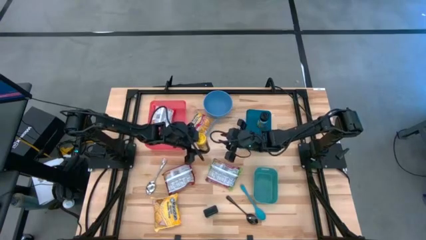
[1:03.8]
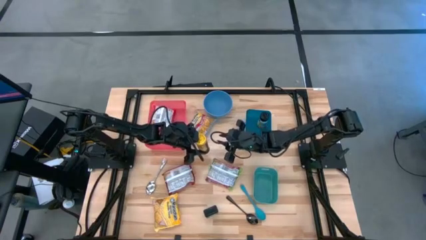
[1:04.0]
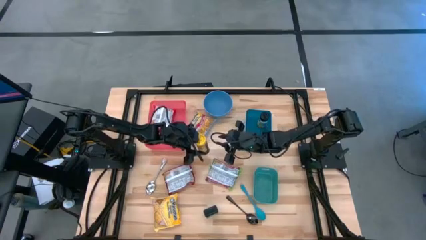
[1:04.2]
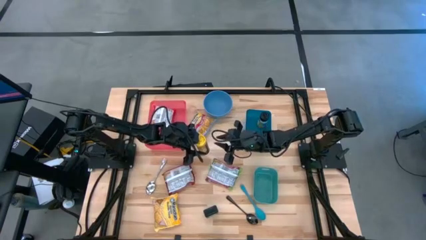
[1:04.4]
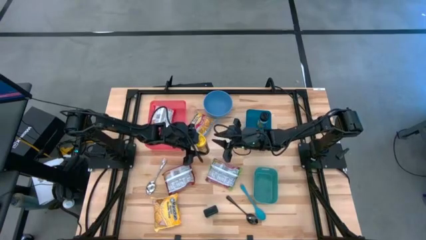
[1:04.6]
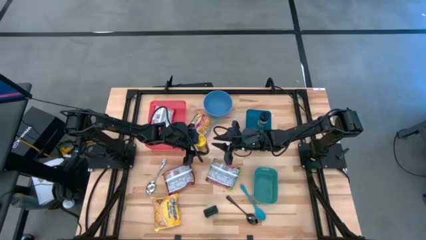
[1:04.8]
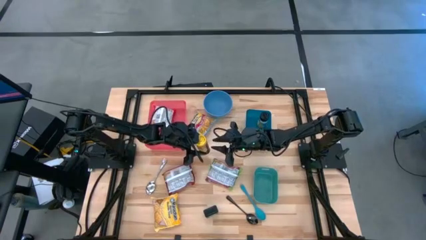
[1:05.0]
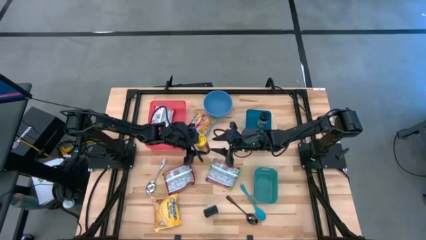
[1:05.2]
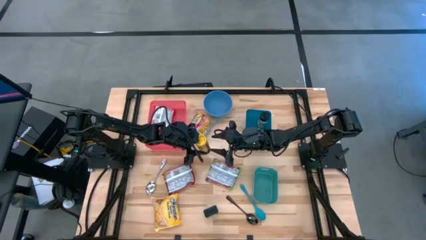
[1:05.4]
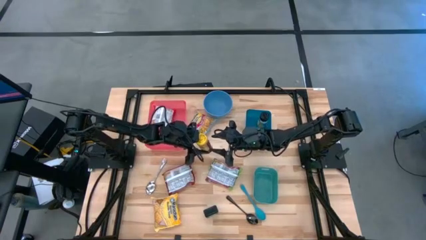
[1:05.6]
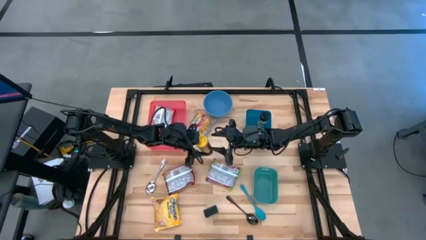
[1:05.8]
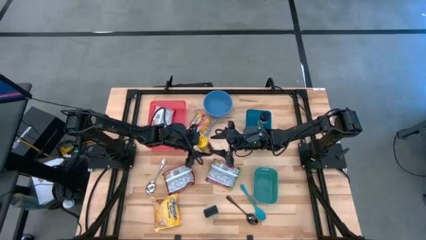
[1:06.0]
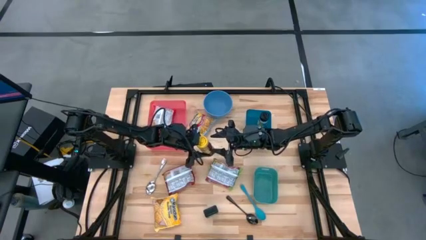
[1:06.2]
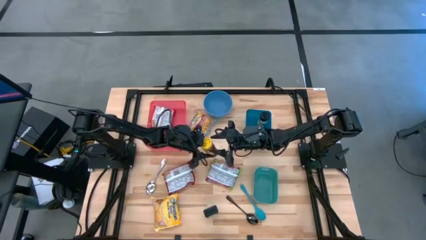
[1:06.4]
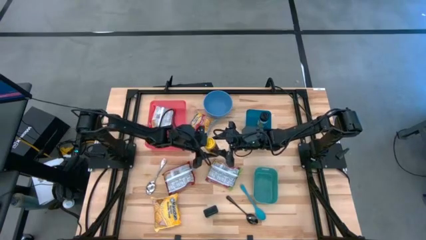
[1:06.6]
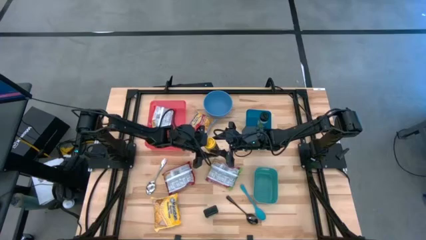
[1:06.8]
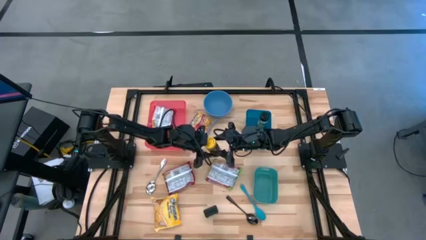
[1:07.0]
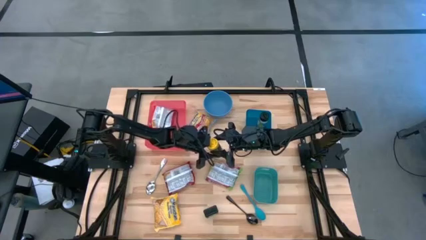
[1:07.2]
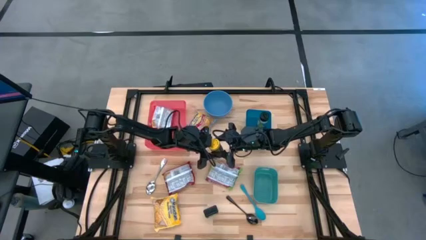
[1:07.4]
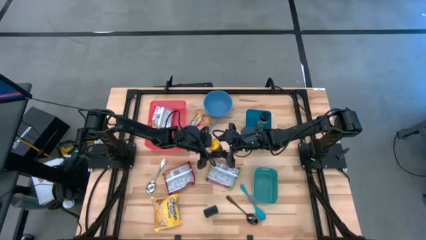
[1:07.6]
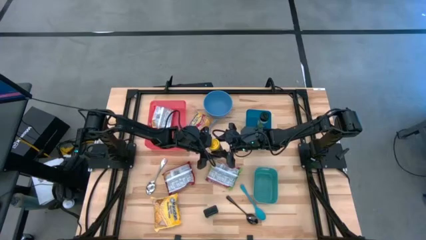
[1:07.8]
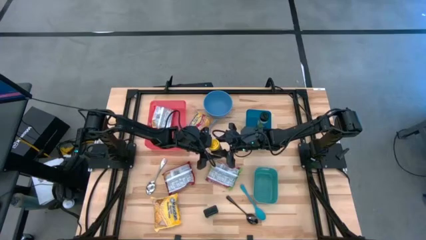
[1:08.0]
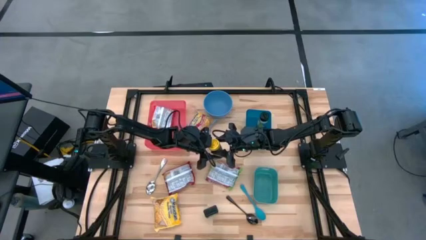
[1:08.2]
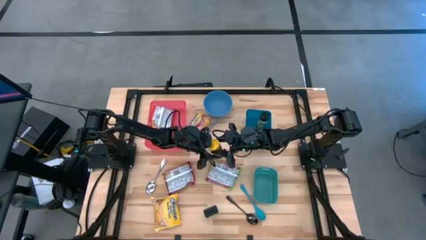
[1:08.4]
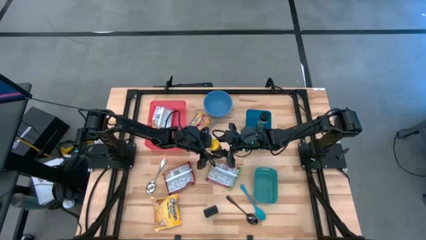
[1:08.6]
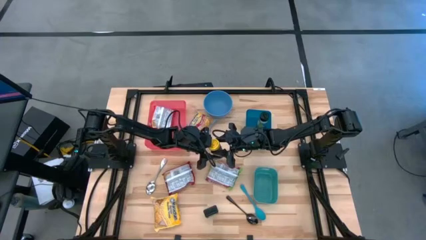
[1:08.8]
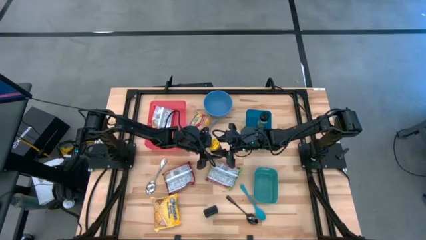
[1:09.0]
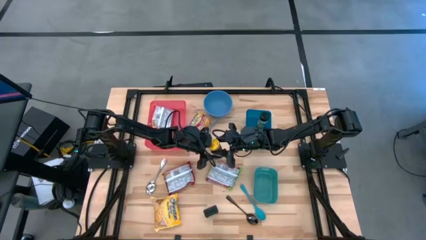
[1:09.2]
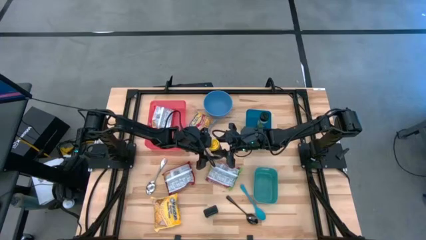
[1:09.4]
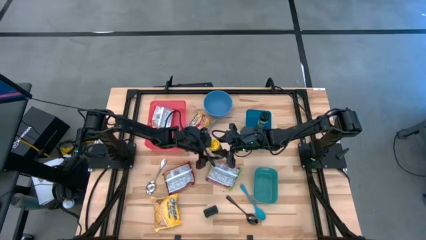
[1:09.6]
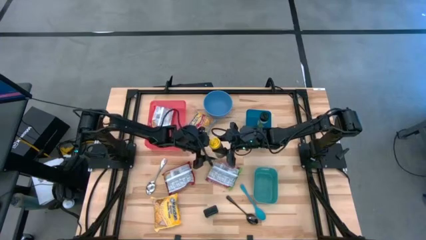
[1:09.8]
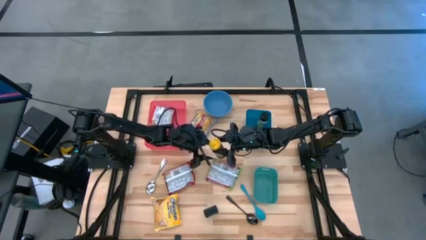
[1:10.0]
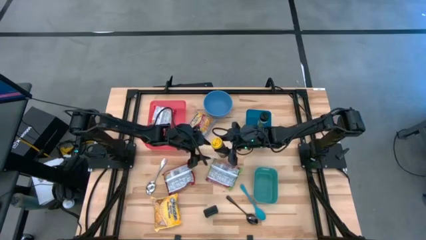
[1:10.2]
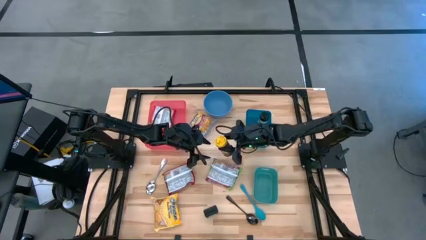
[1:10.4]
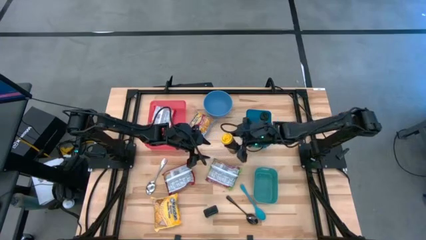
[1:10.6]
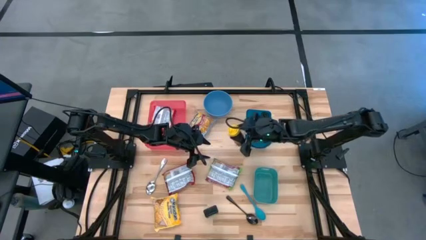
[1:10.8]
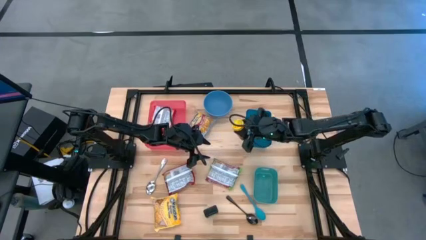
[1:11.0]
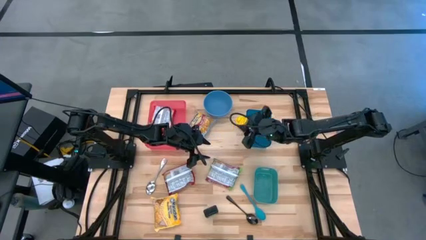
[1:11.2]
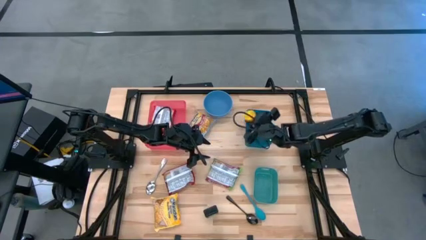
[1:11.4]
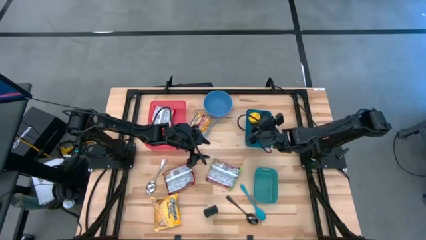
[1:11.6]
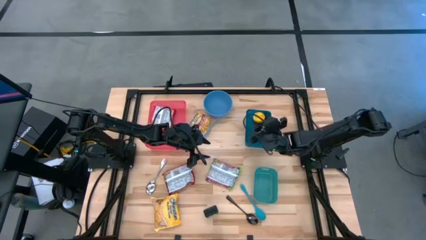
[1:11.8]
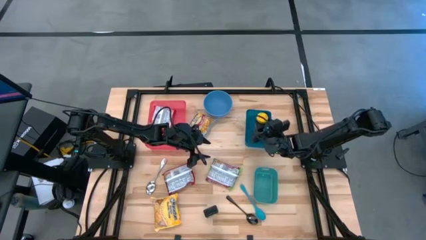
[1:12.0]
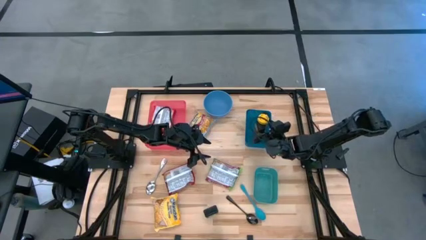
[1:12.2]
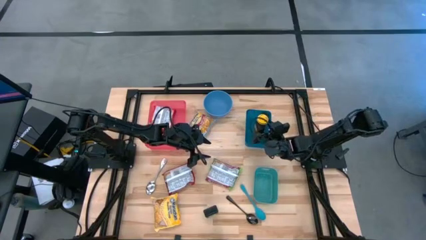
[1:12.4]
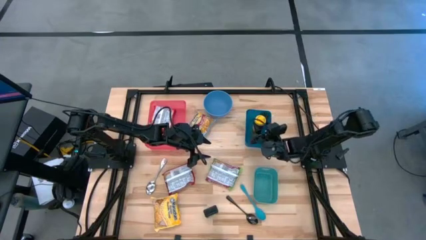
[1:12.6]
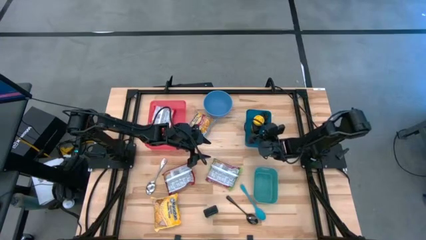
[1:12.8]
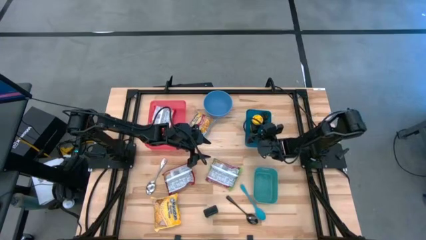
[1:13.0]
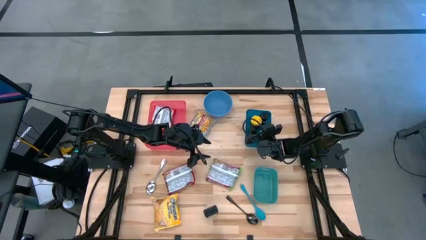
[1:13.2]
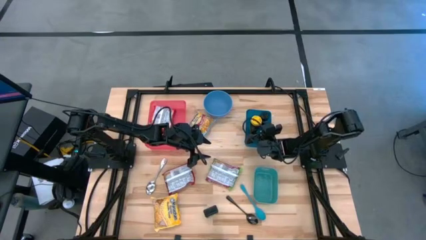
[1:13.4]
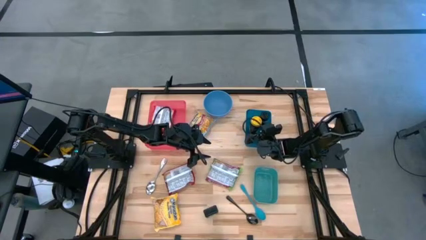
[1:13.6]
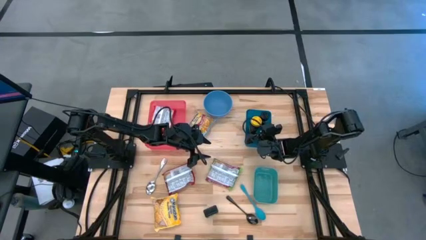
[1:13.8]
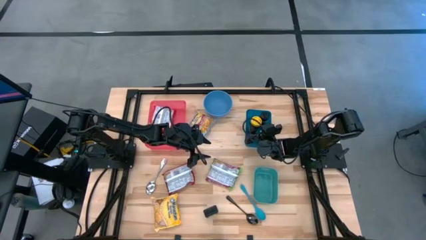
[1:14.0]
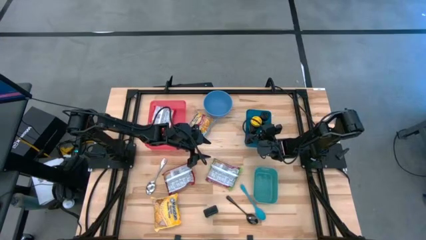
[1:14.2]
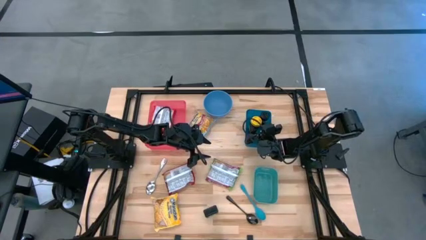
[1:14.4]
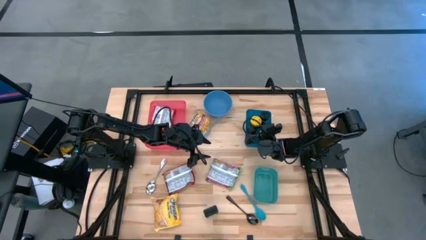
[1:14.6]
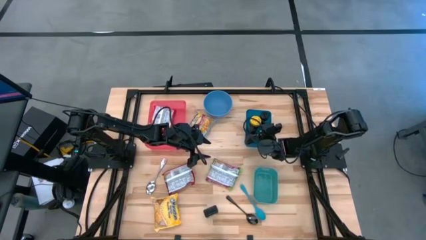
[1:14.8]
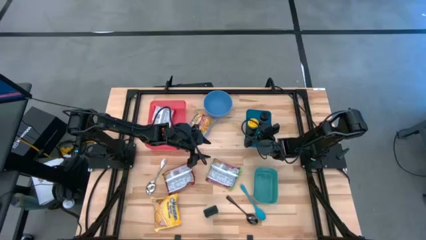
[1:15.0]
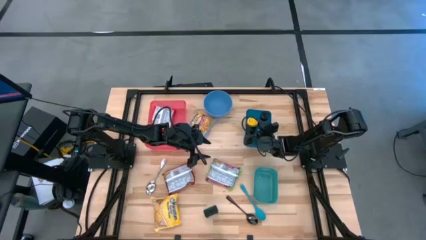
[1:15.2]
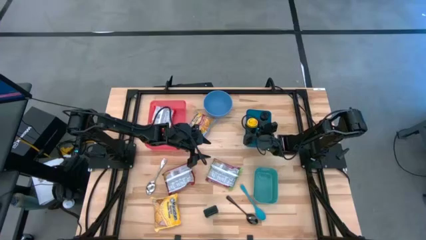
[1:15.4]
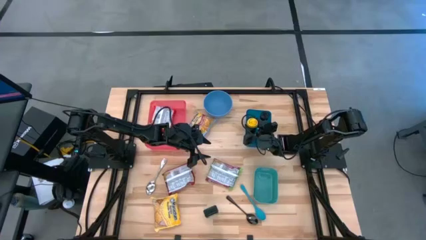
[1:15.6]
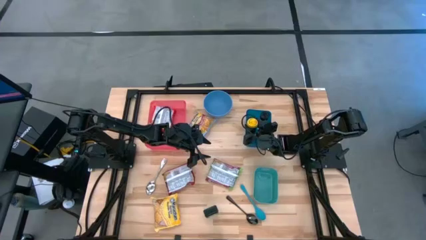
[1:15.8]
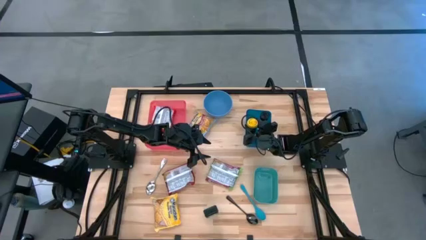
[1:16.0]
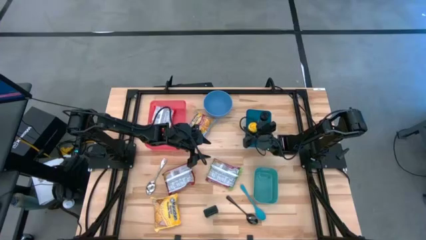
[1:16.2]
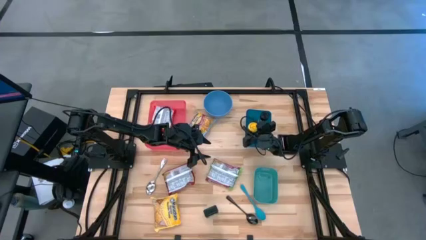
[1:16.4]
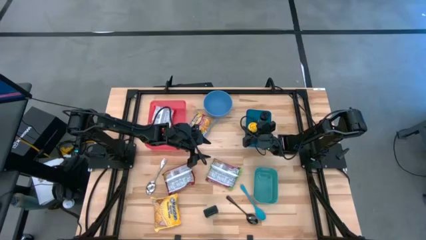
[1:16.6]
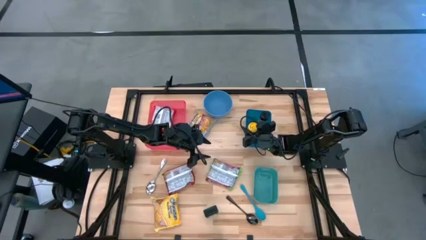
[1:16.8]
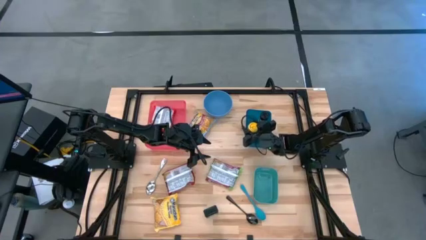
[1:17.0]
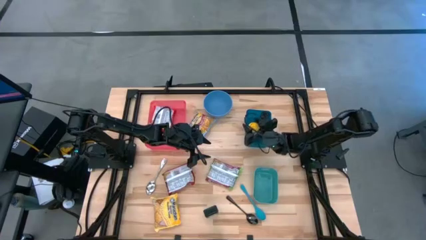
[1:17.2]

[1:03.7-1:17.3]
Task: Pick & Place Food Item
Put the yellow seasoning bottle into the blue bin

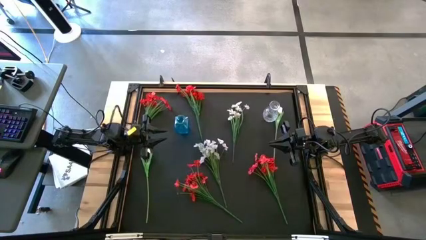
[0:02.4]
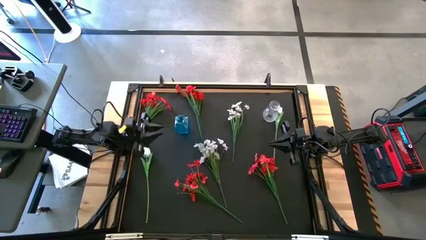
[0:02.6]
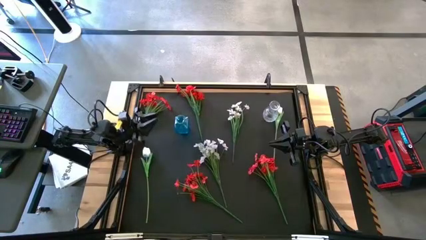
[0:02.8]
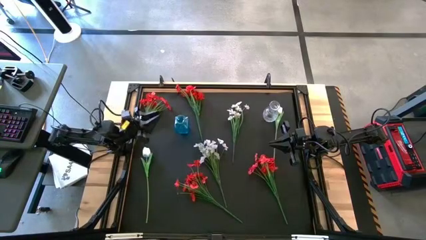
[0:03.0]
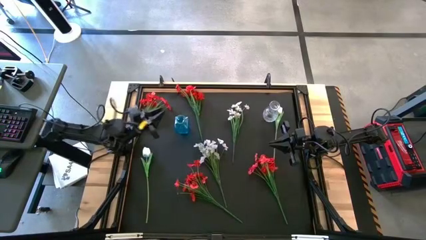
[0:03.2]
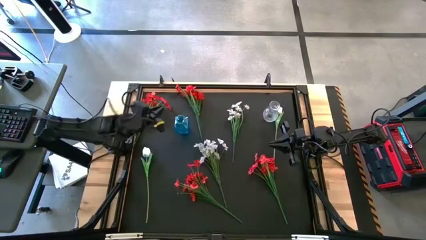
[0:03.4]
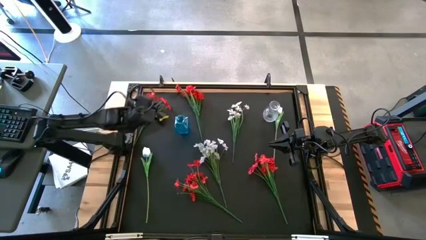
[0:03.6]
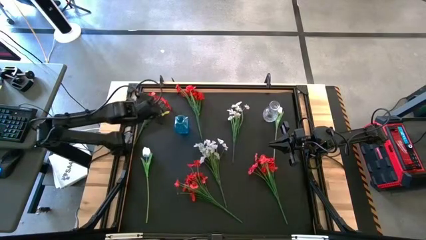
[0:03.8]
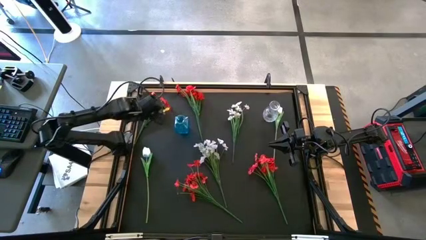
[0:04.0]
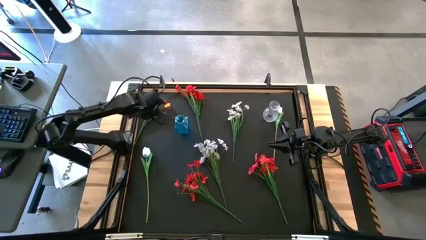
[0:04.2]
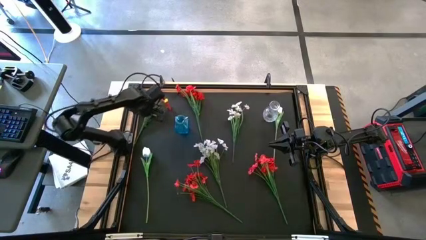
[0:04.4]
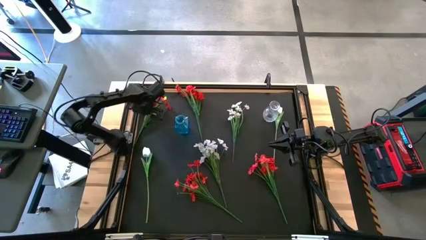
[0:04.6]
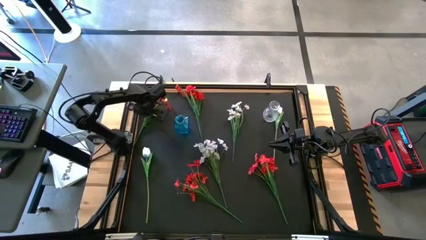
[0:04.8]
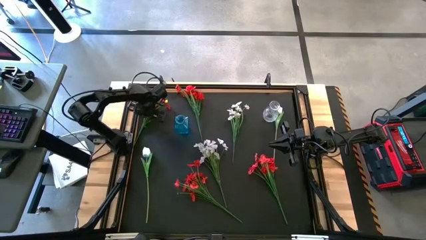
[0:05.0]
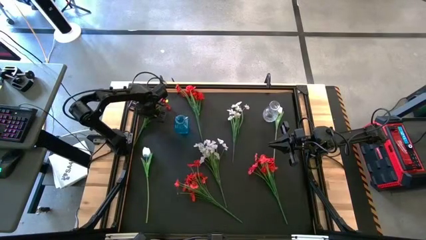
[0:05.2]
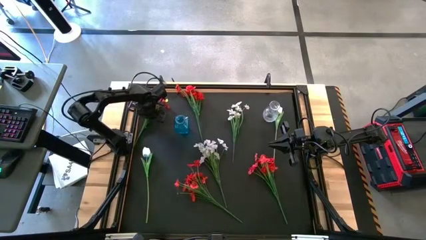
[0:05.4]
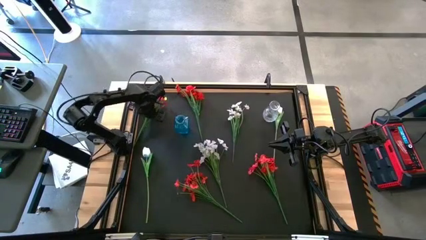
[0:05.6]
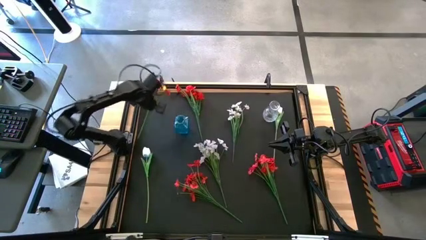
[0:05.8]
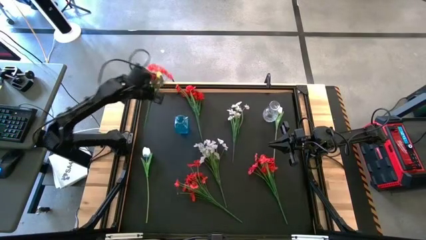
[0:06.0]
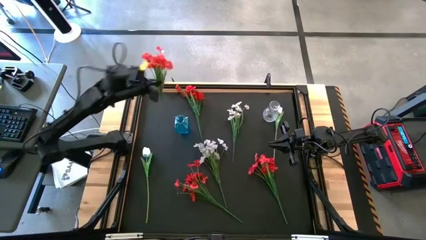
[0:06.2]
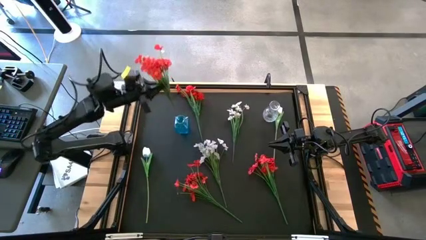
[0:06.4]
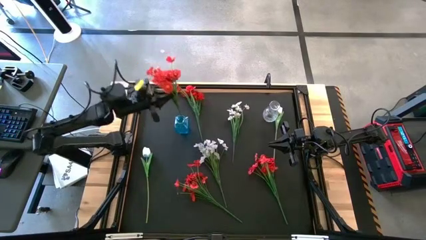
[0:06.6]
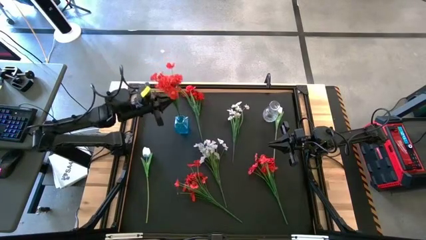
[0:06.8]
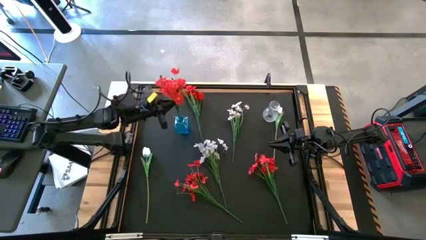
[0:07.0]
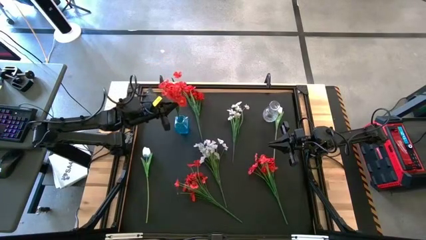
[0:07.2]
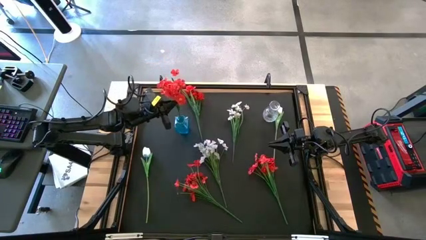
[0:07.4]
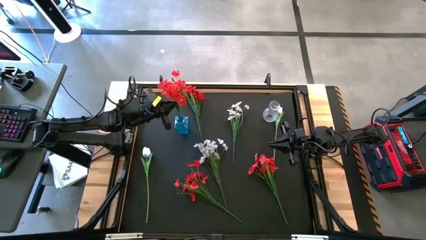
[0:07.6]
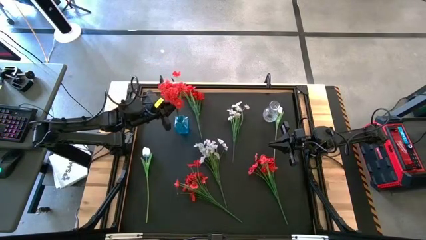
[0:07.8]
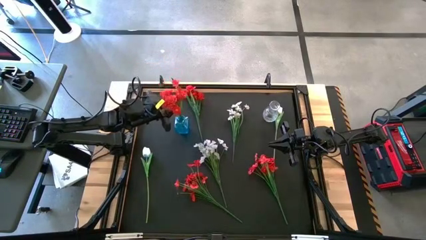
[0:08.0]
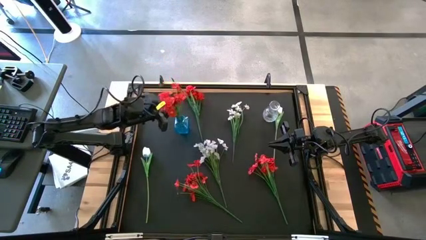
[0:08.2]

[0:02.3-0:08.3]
Task: Sort flowers into vase by color
Put the top left red flowers into the blue vase
